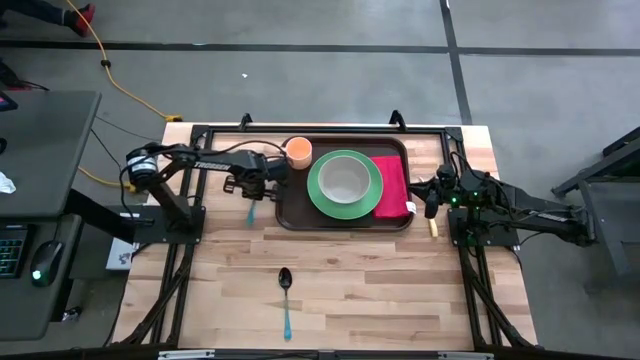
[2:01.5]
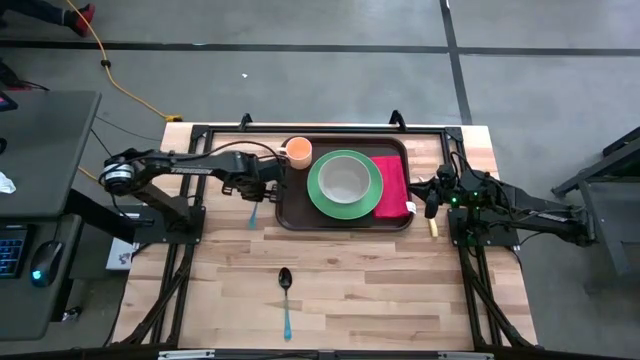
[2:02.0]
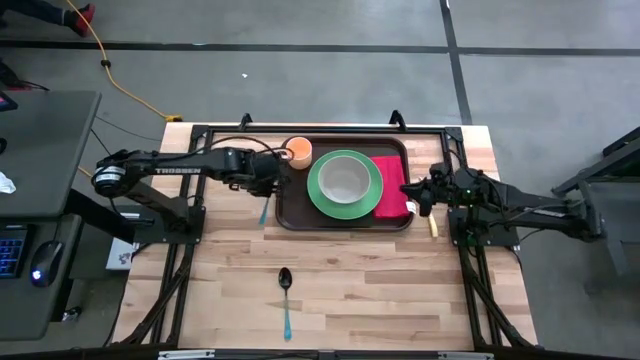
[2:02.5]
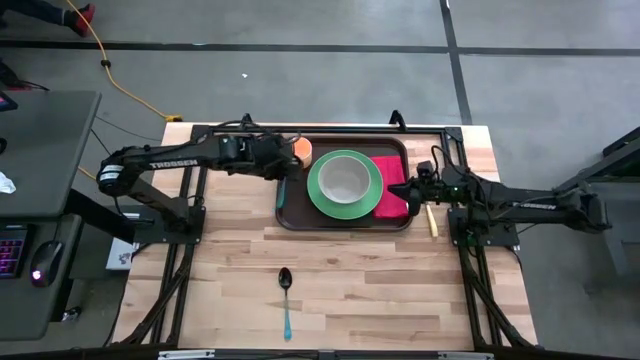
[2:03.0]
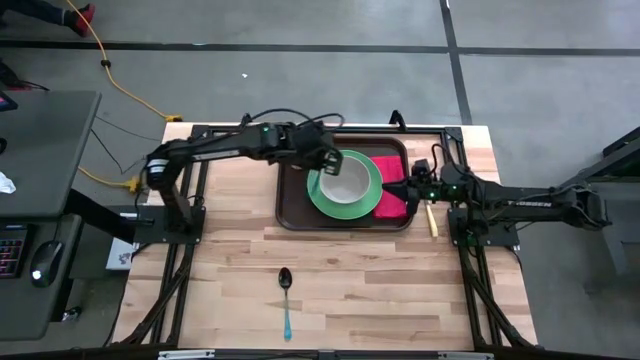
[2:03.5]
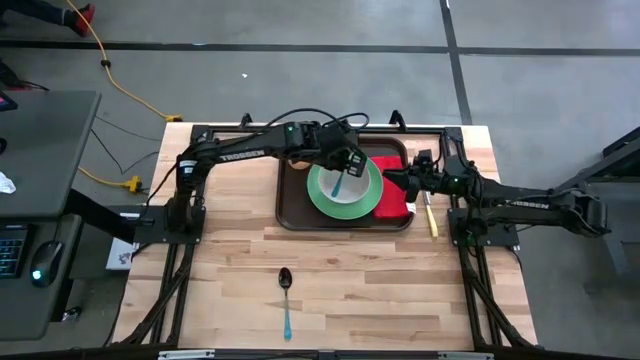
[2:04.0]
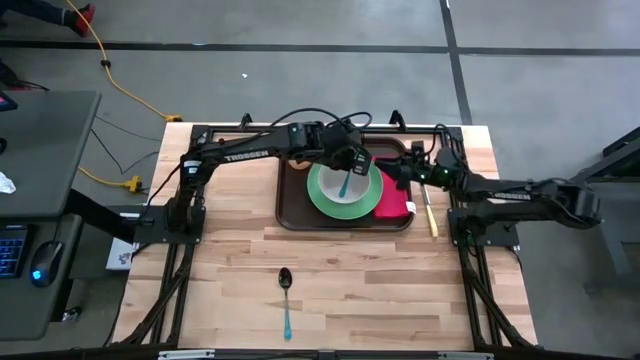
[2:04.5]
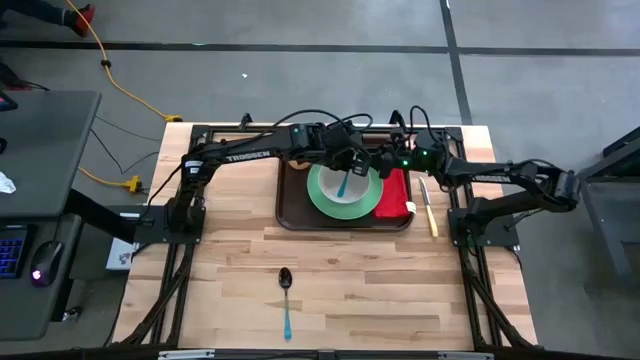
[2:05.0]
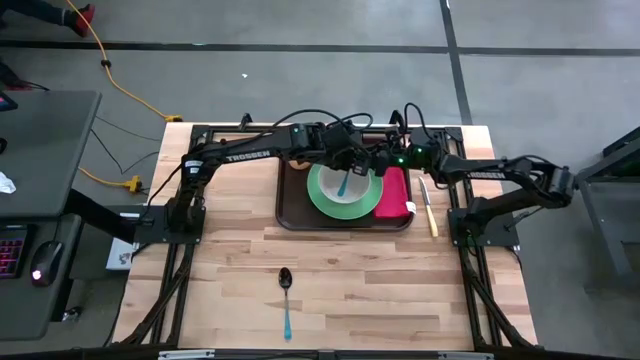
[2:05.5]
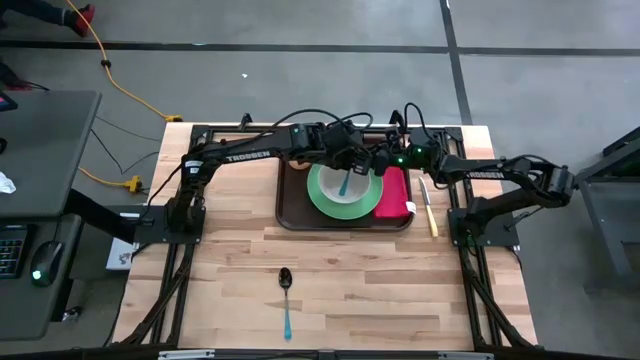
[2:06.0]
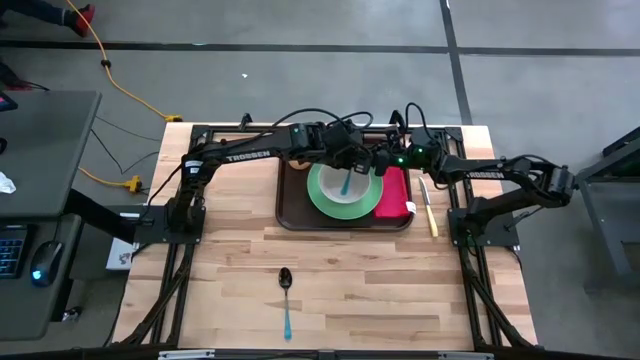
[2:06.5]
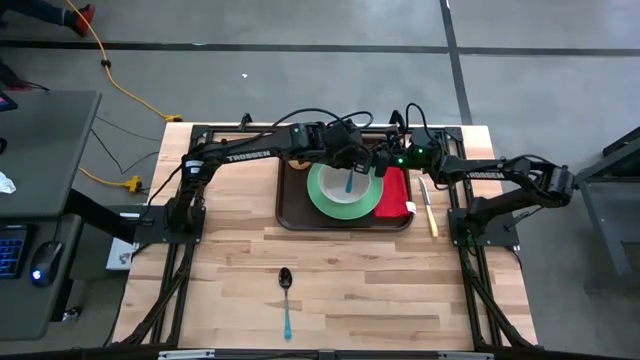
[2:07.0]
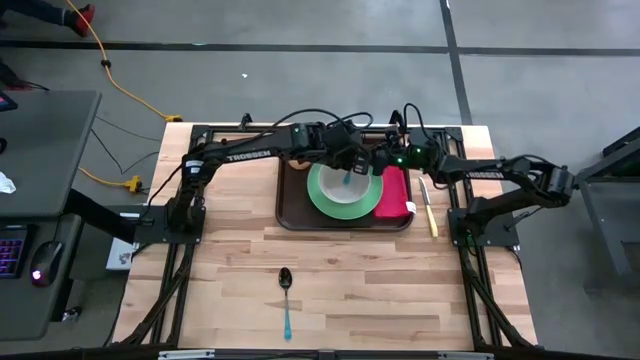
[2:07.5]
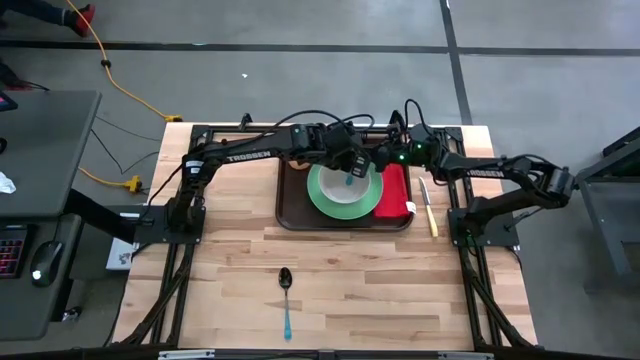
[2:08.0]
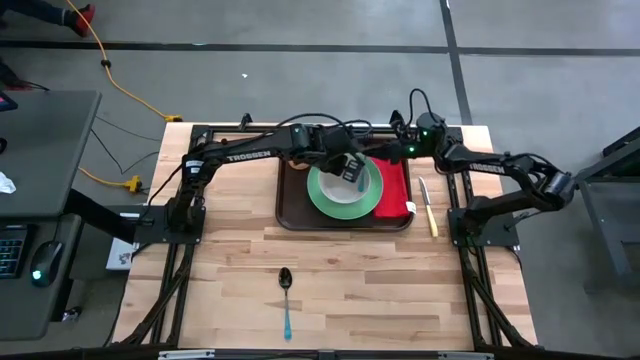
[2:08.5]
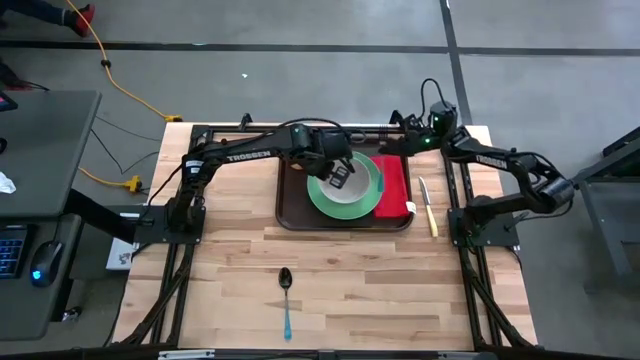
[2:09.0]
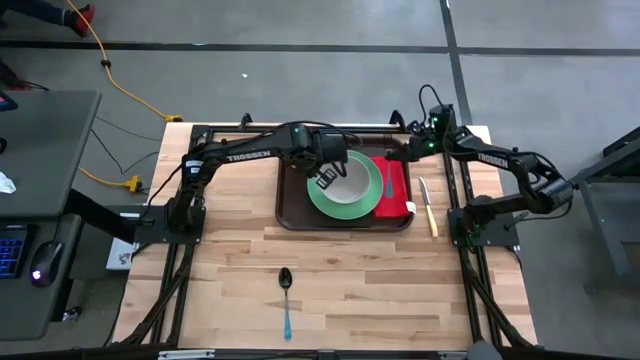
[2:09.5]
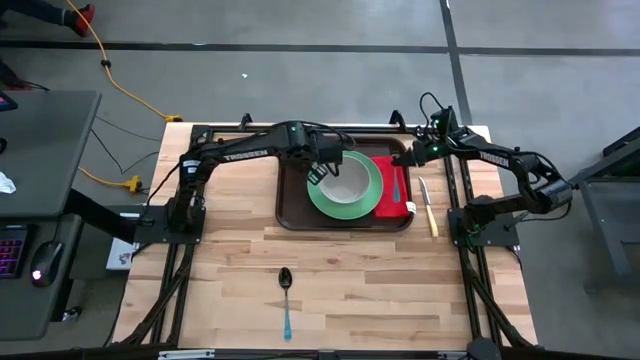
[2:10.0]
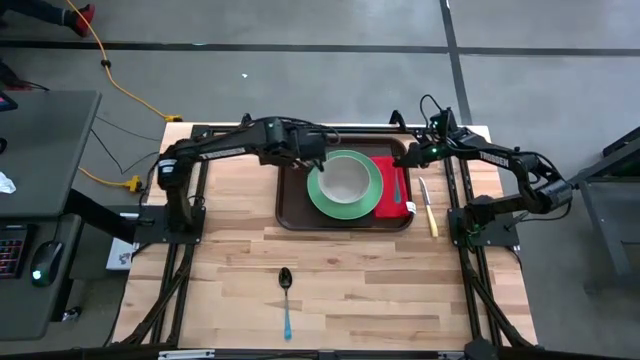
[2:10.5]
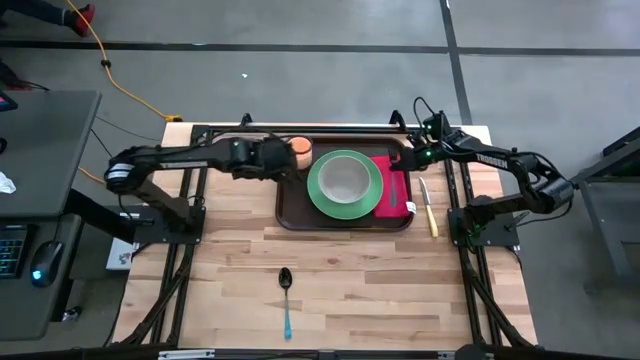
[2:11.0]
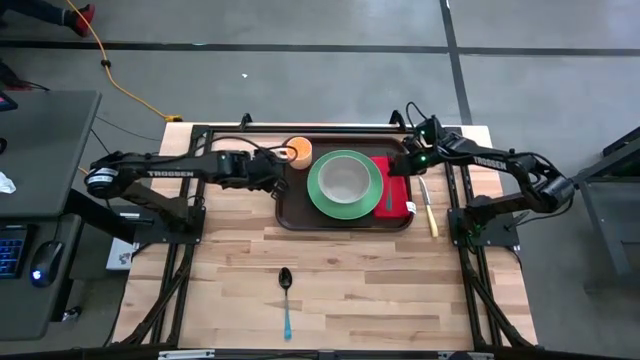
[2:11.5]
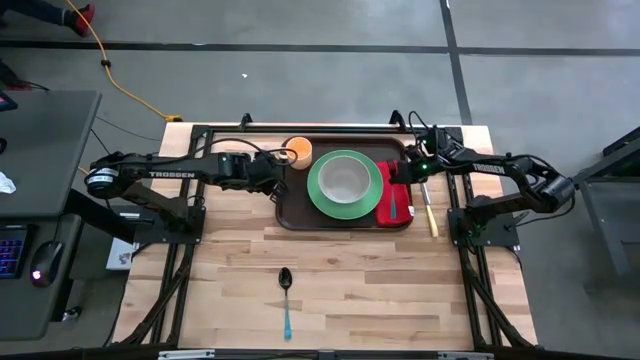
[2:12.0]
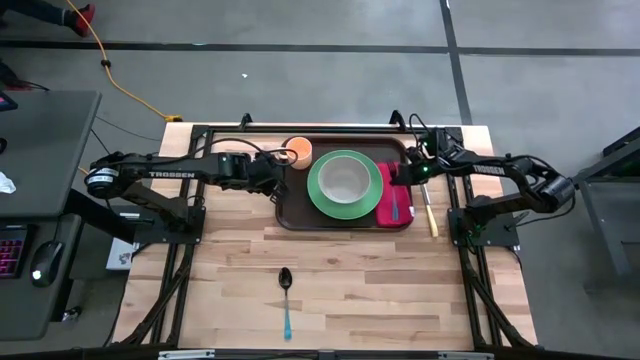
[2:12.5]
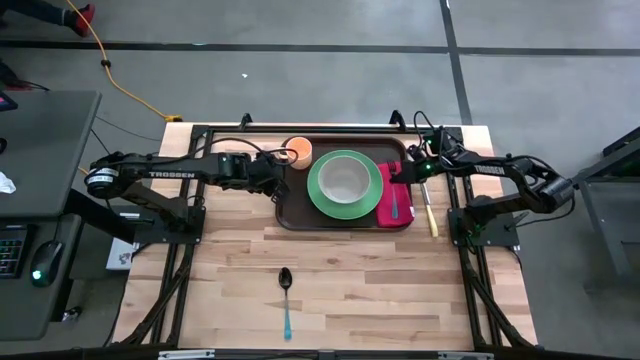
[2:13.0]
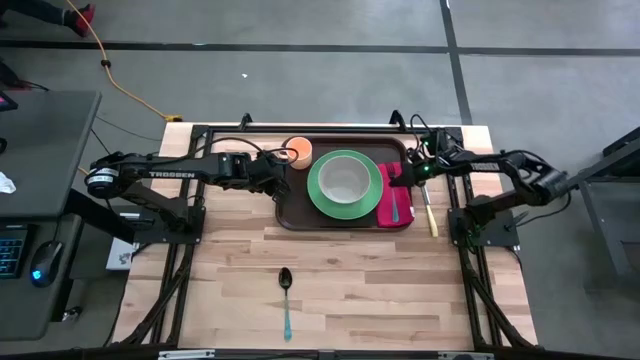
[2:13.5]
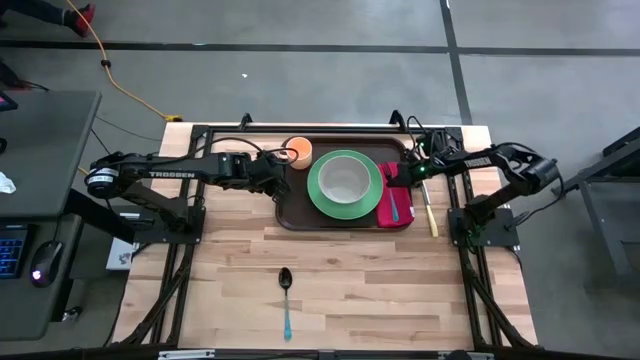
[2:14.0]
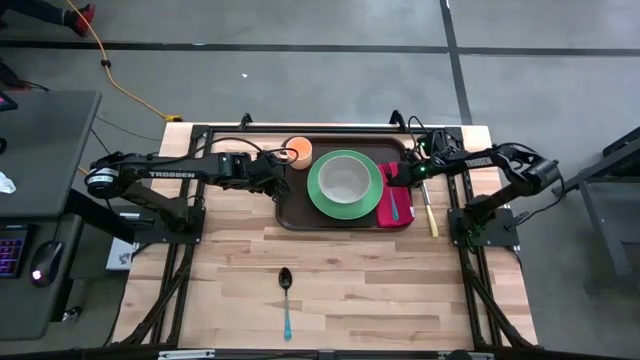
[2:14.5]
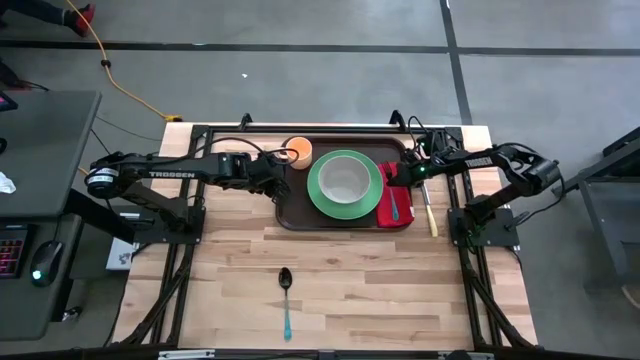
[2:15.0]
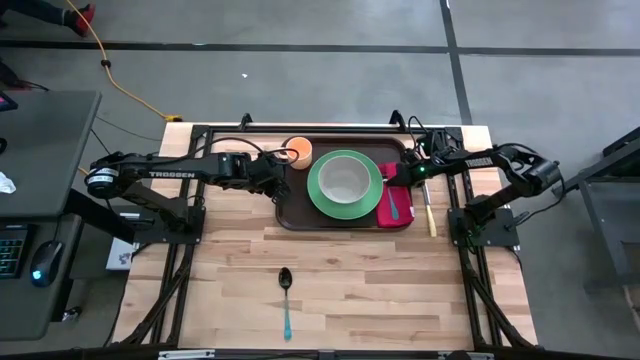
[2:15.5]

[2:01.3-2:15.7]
Task: Set up tray
Put the blue fork on top of the red table napkin on the brown tray

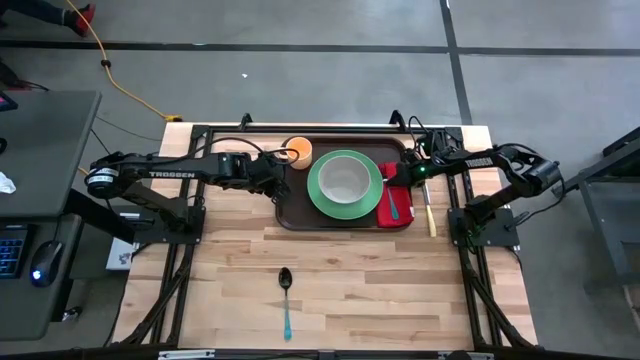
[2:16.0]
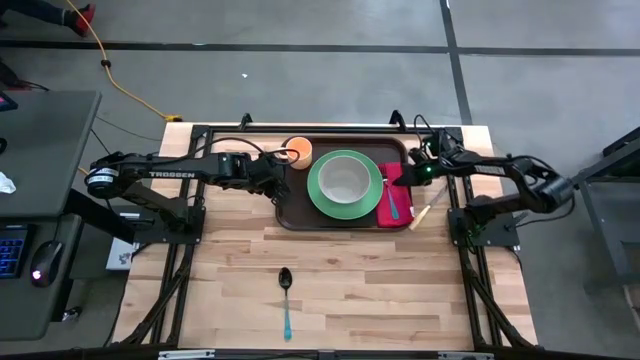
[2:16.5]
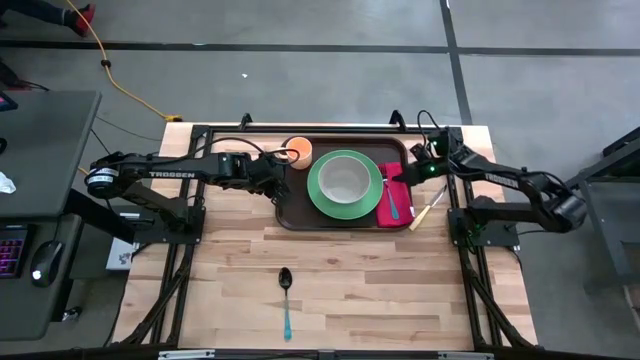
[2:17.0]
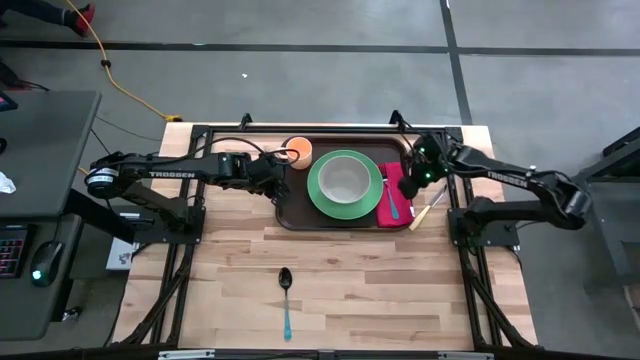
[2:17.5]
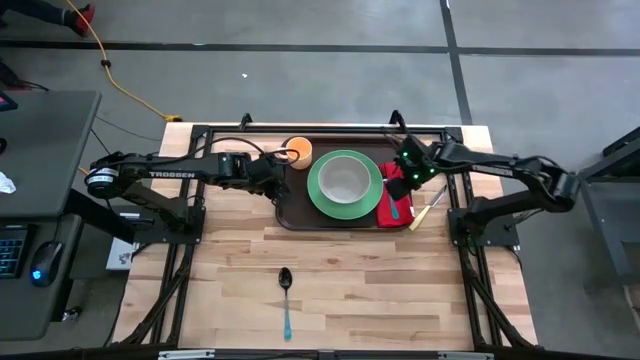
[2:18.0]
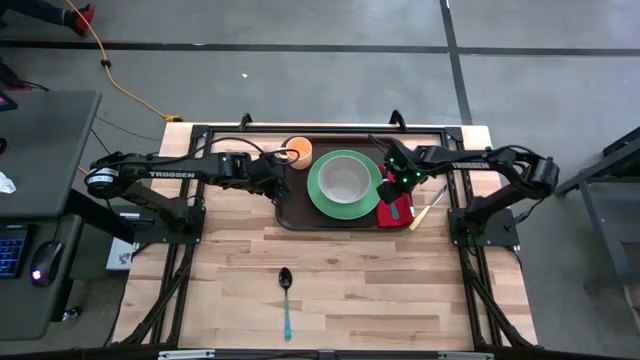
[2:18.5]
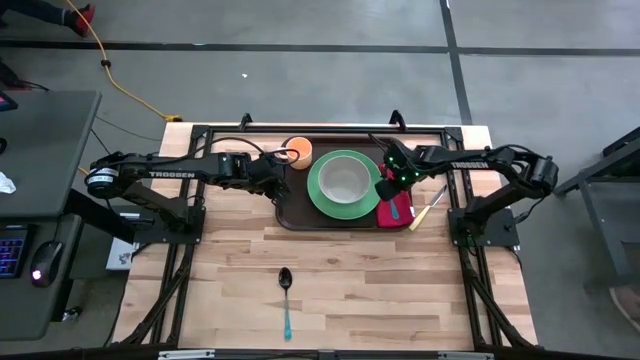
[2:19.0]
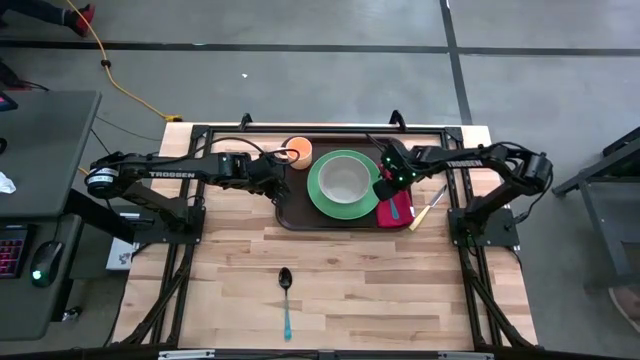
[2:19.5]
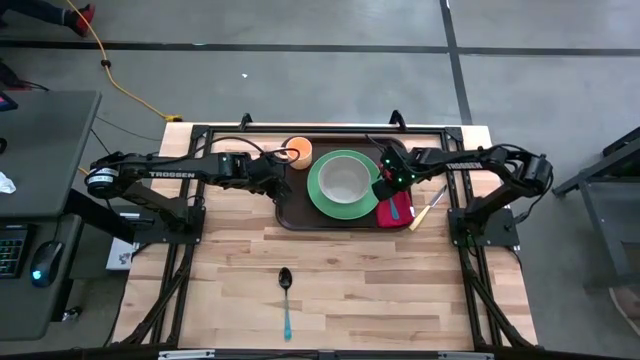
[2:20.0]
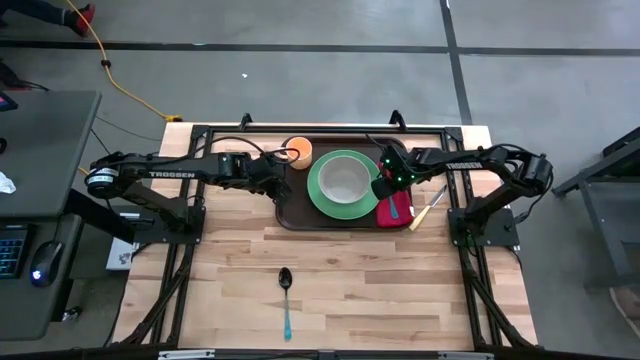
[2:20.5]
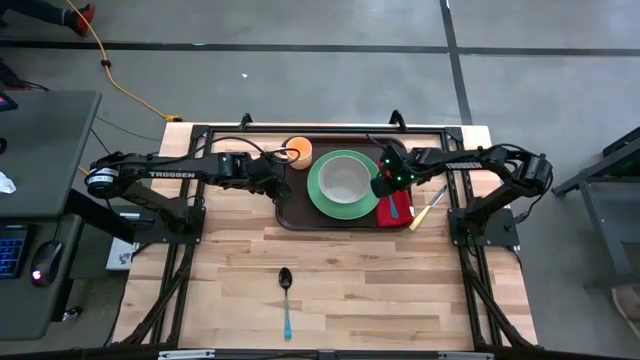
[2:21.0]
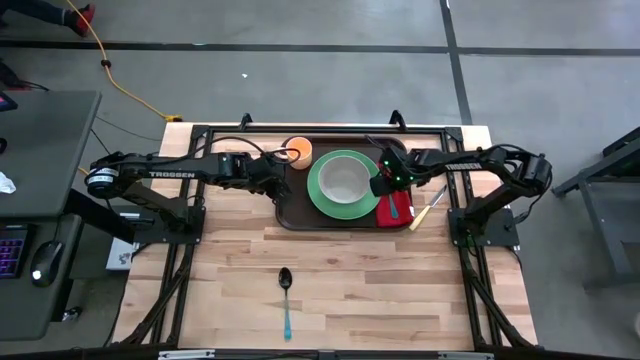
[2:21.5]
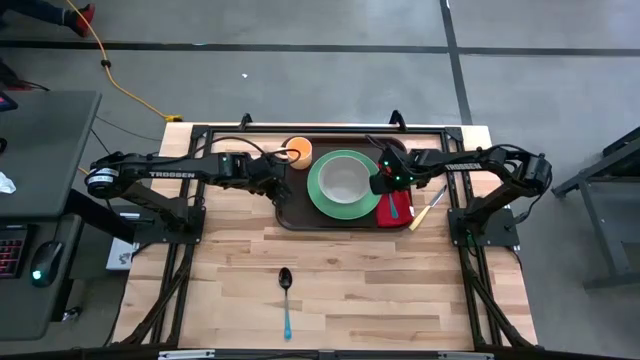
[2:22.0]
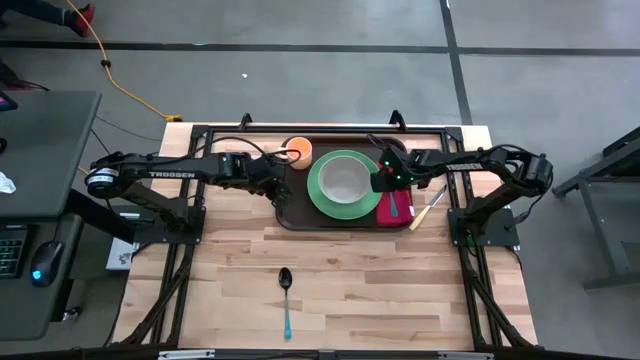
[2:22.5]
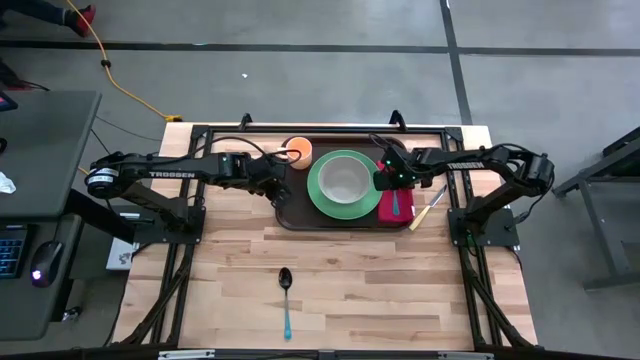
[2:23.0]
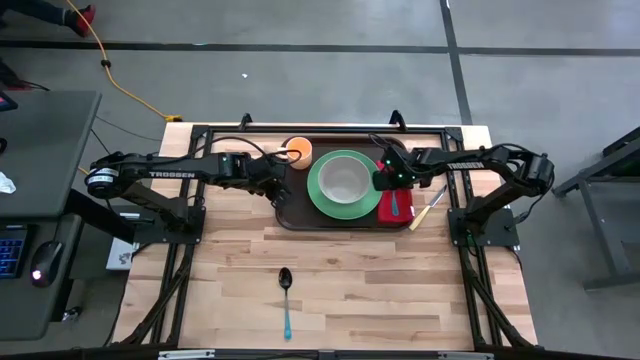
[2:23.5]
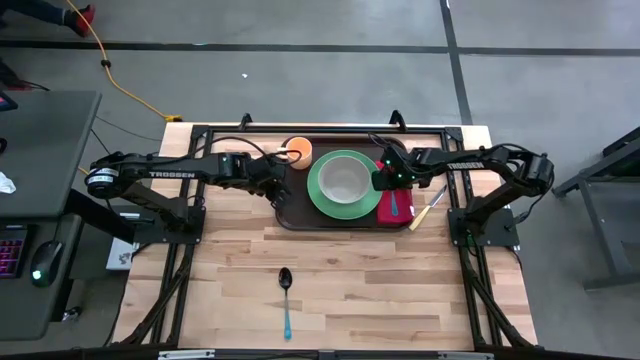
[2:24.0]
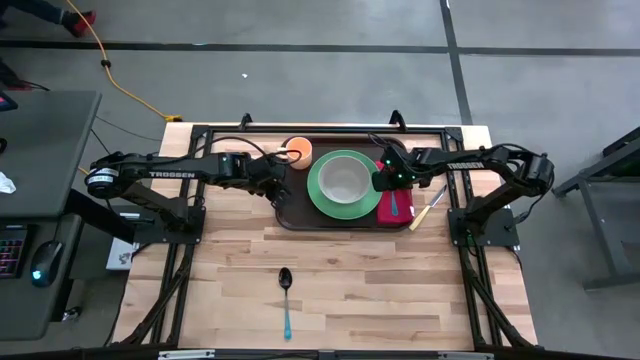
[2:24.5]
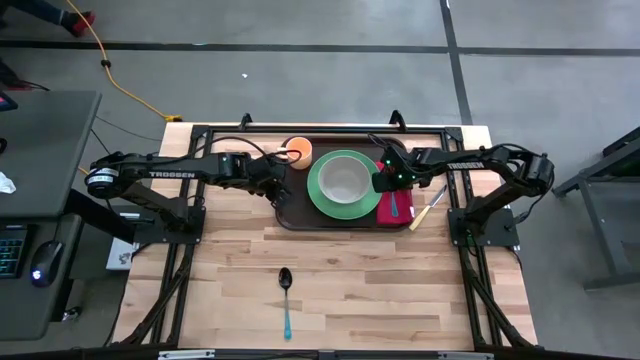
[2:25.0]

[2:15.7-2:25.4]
Adjust the red table napkin on the brown tray
